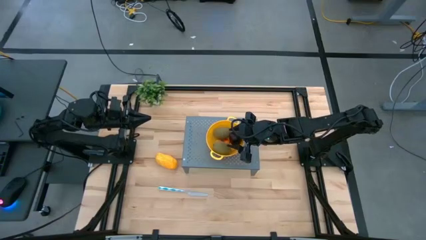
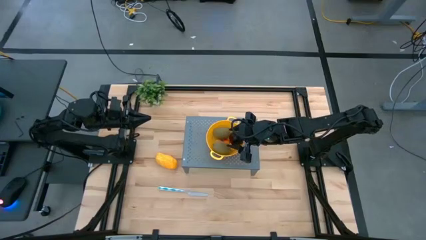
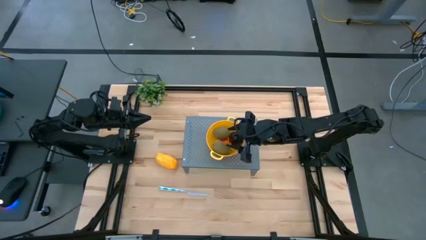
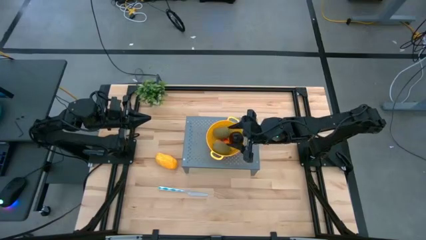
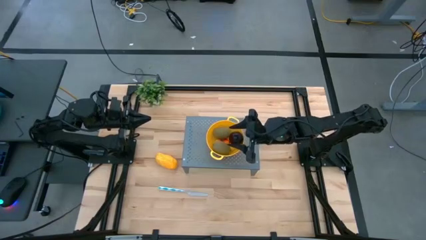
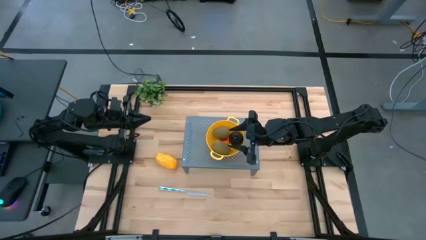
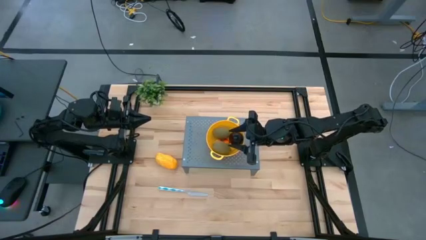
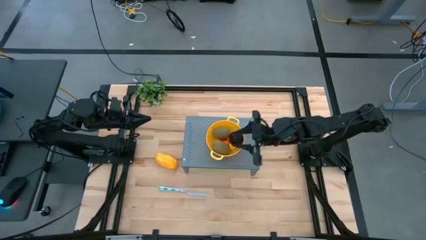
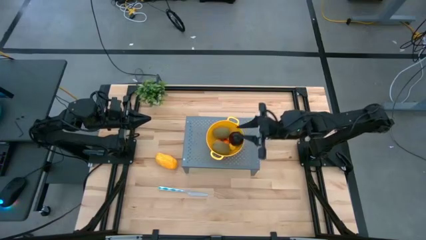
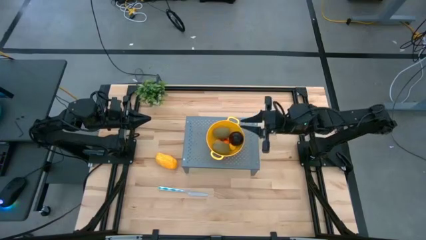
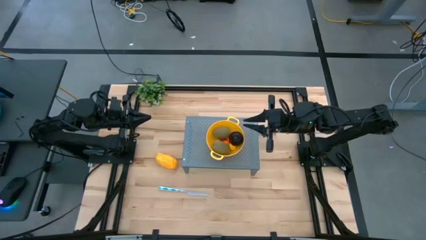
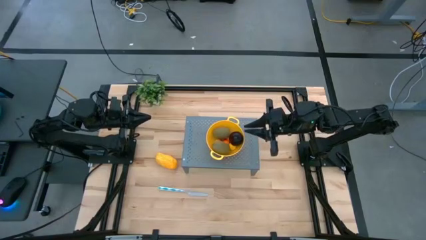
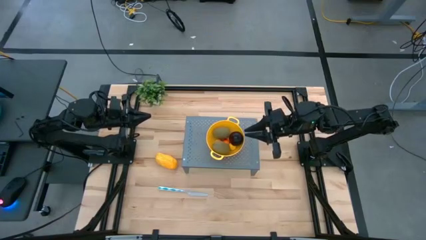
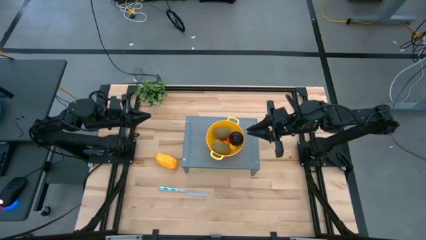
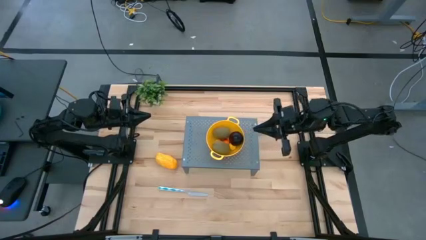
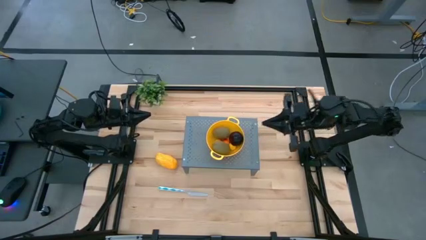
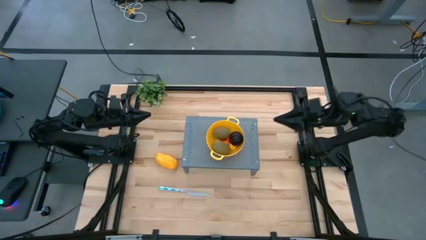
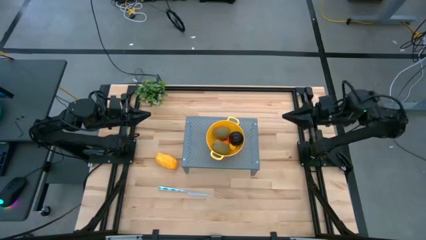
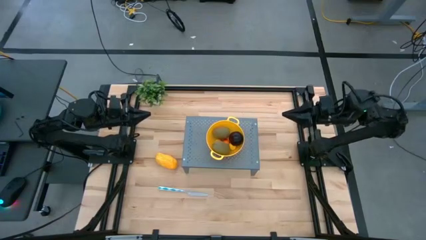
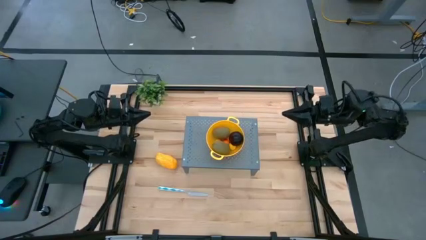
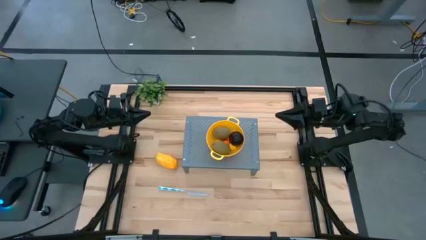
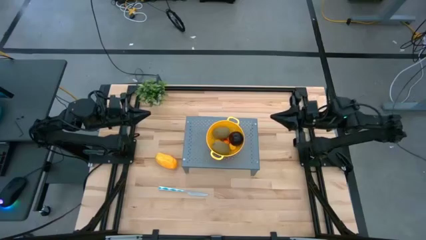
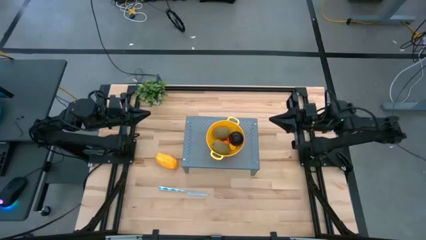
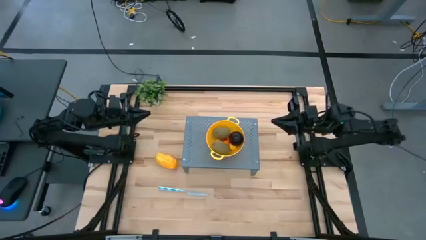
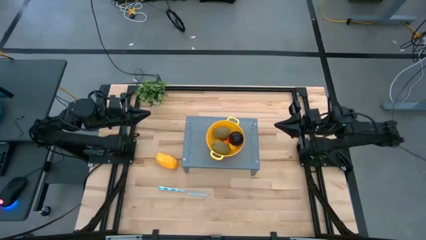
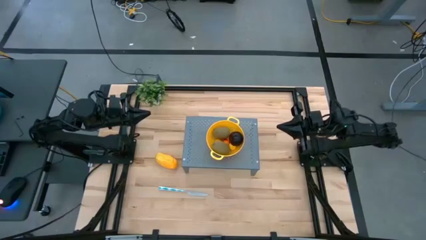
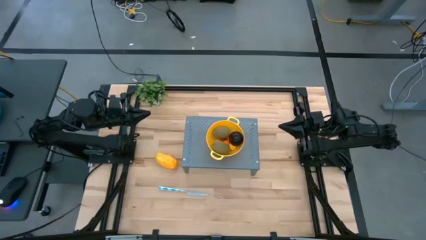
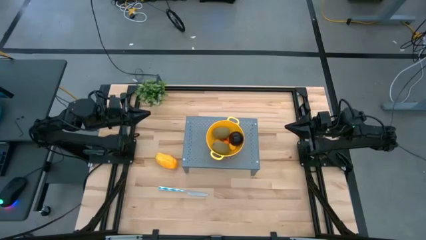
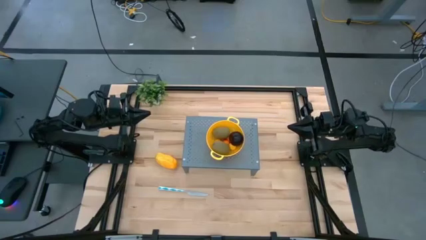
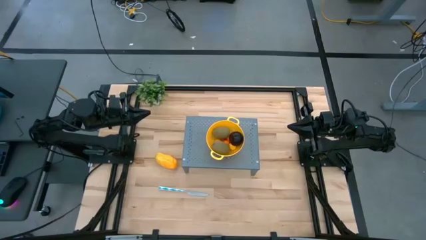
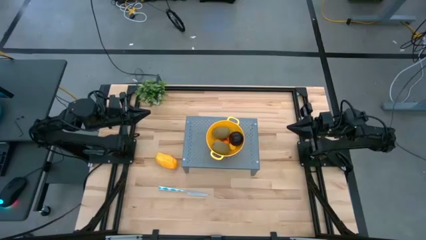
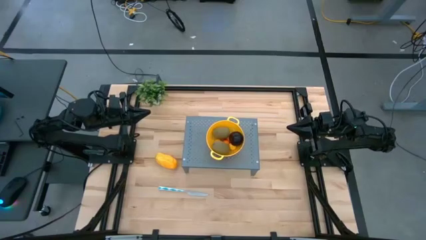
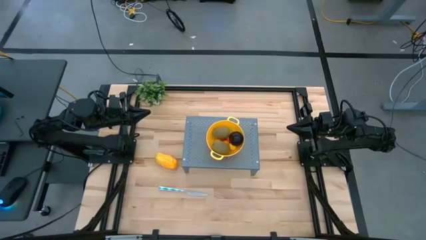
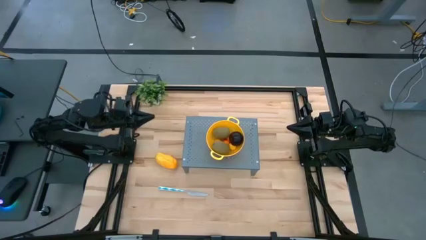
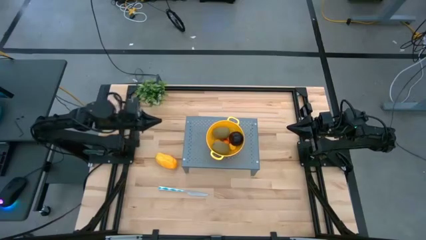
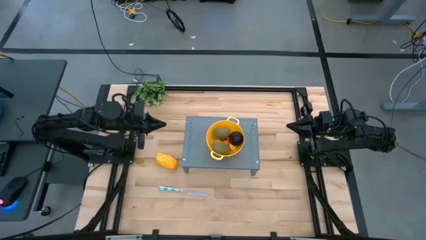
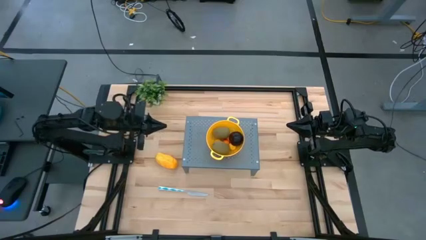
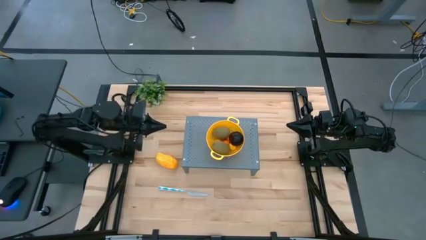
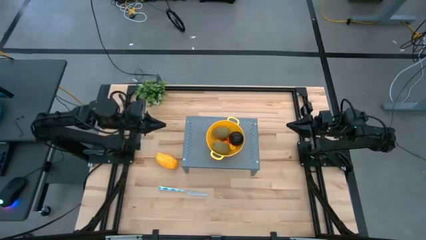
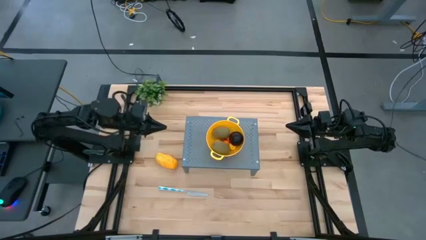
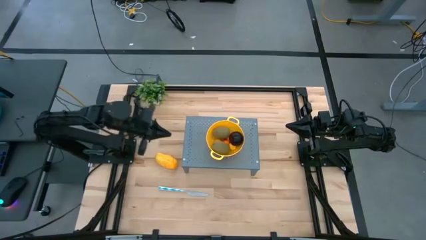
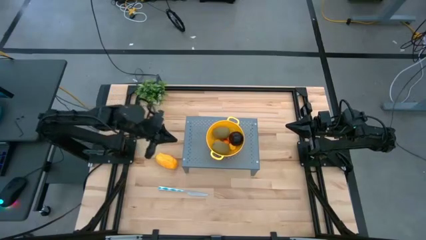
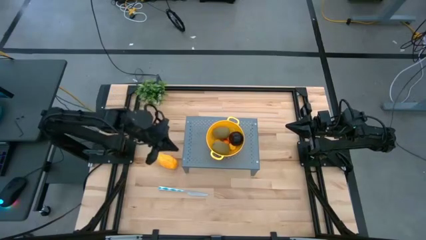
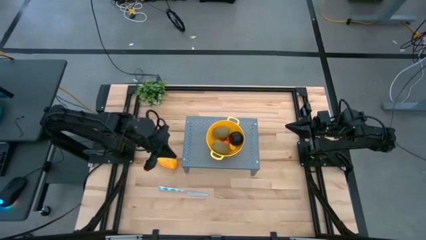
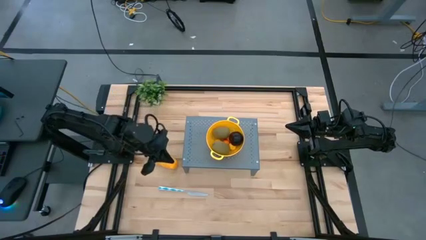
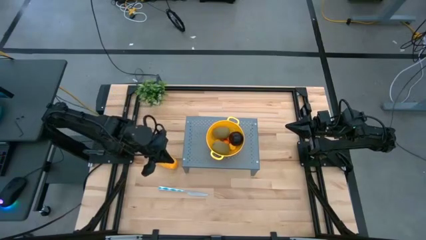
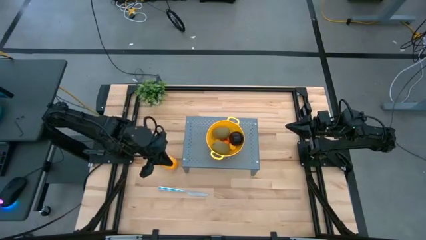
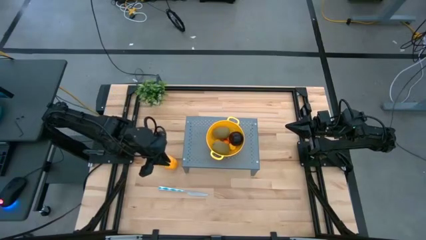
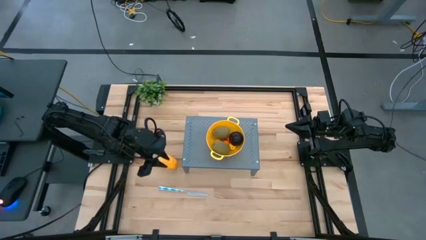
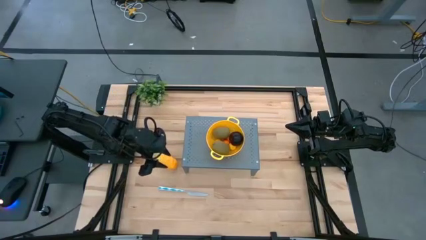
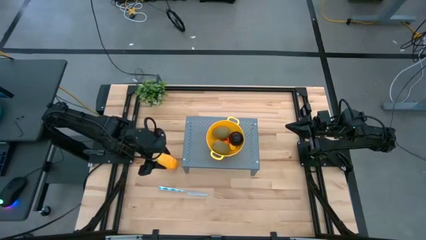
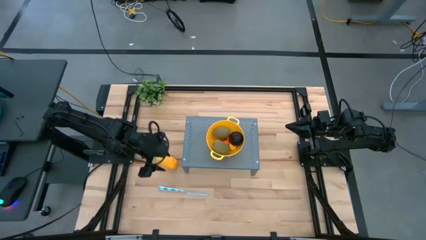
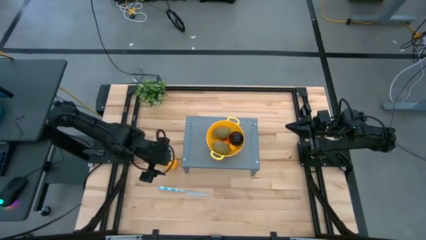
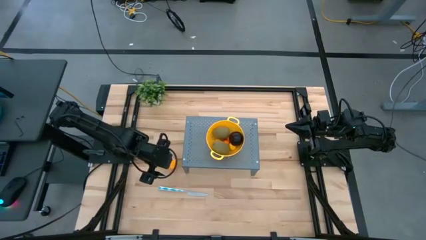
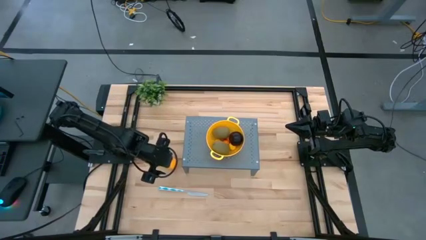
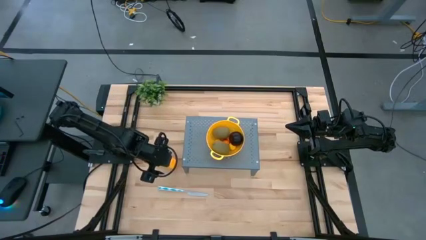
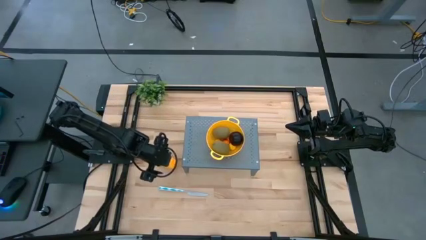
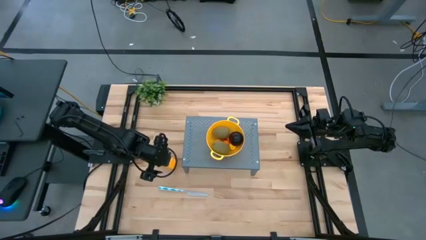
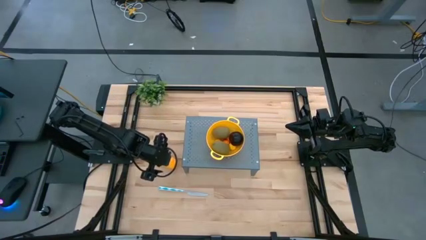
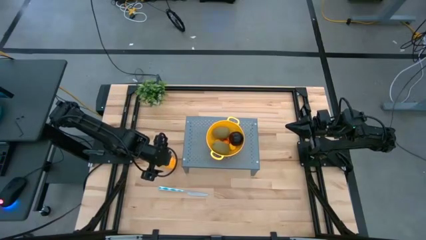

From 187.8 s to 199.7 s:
Task: Pick & Place Fruit
Put the mango into the strainer bowl on the shelf

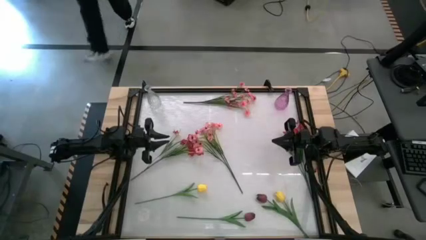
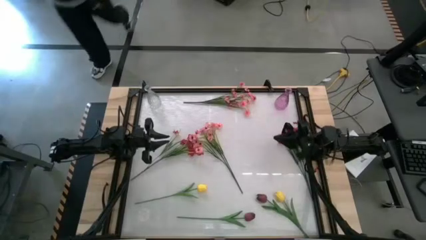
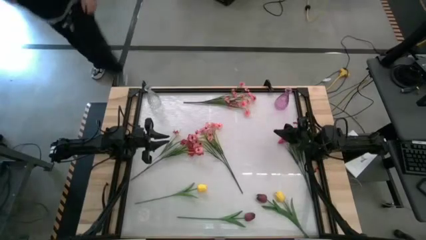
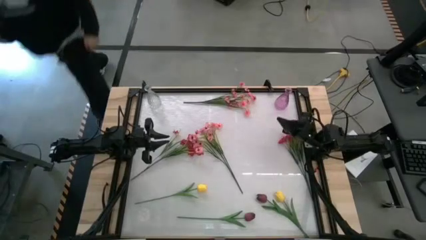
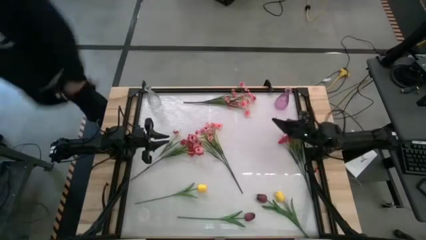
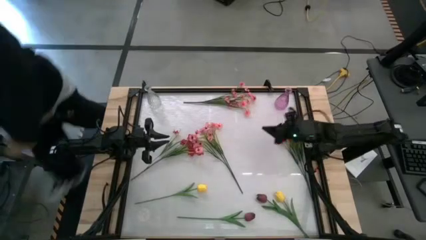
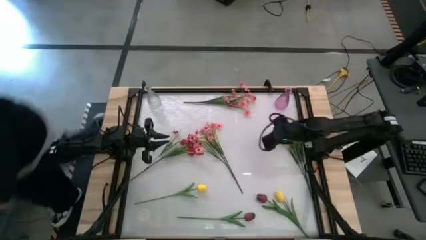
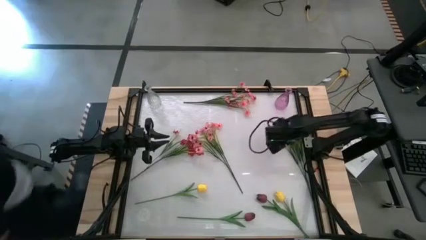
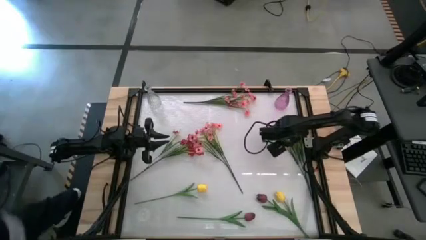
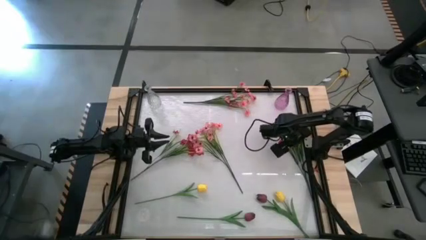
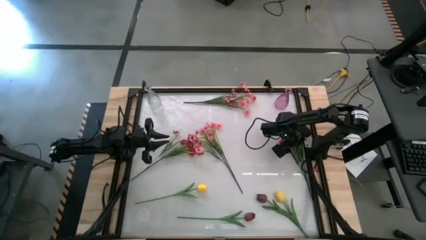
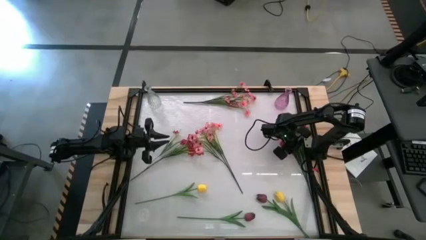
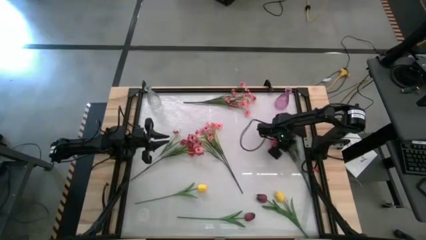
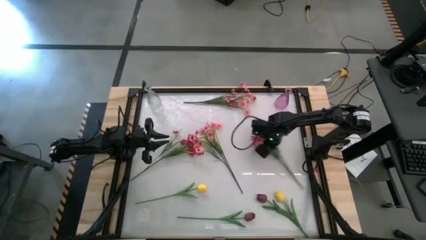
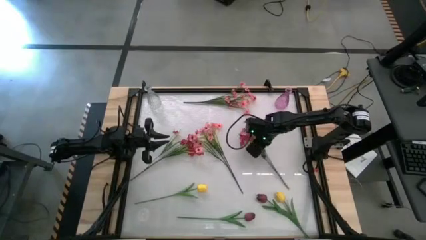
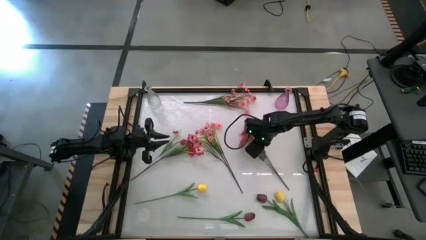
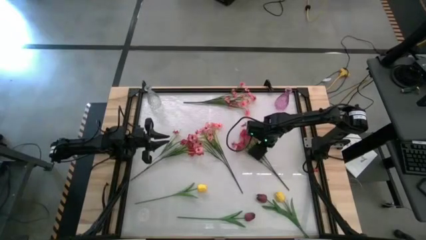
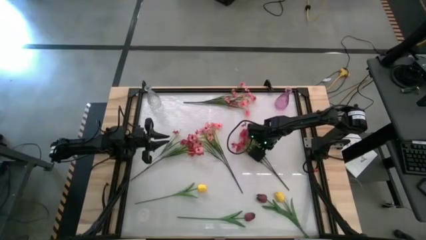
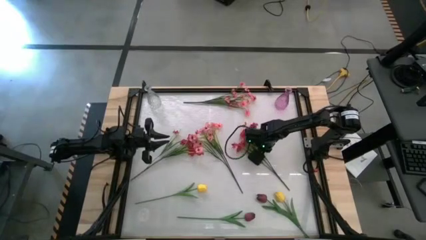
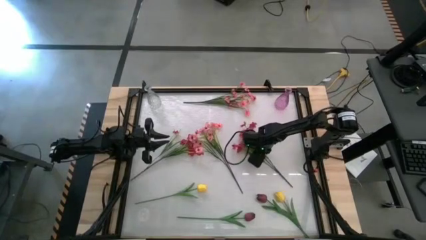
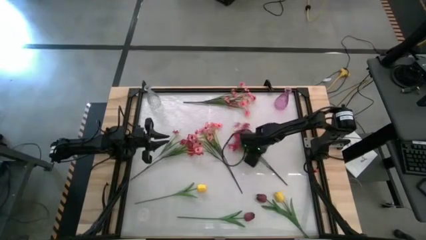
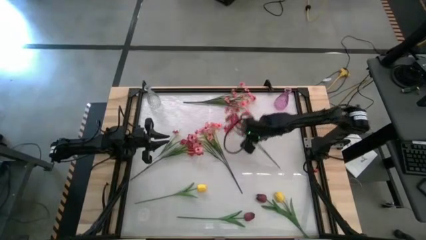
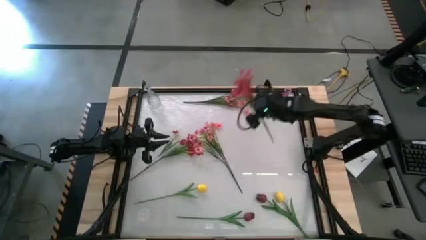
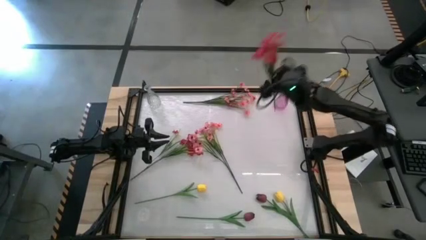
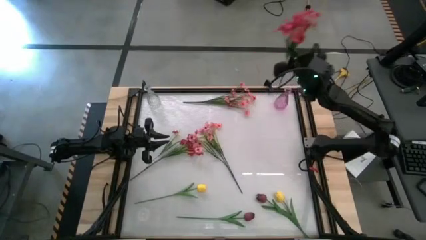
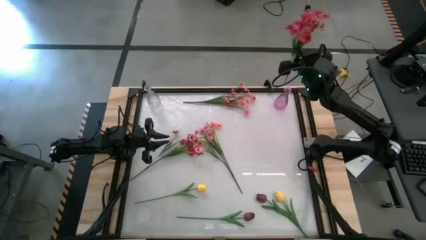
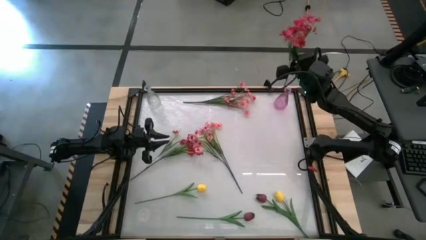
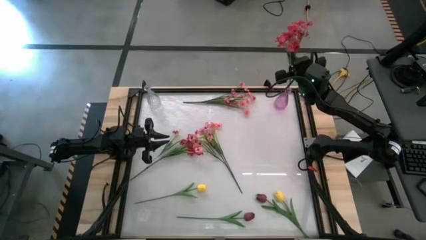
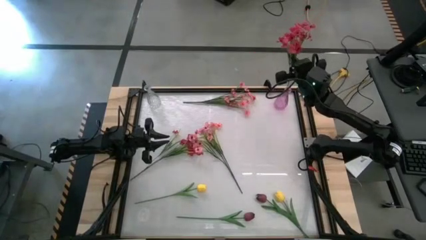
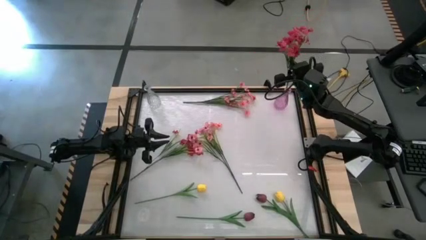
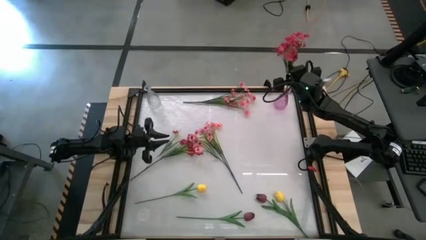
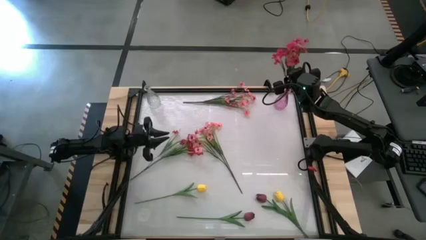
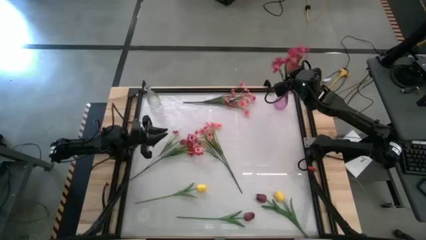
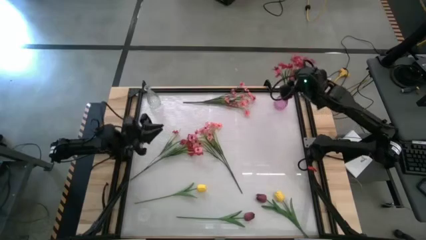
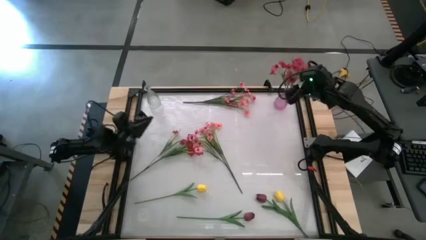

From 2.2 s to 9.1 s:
Task: Sort flowers into vase by color
Put the right pink flowers into the pink vase
